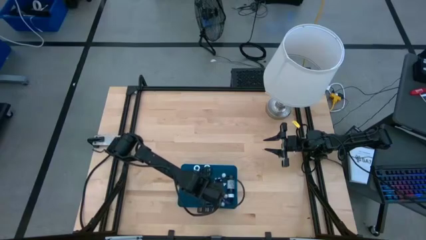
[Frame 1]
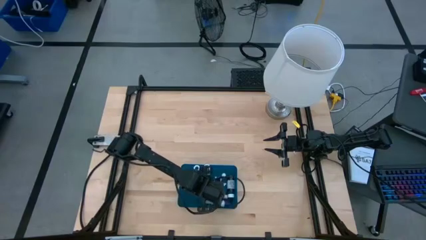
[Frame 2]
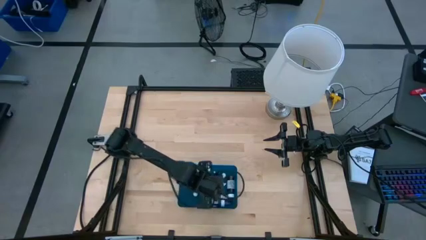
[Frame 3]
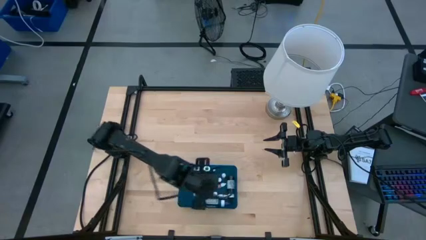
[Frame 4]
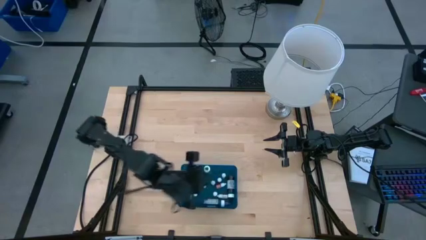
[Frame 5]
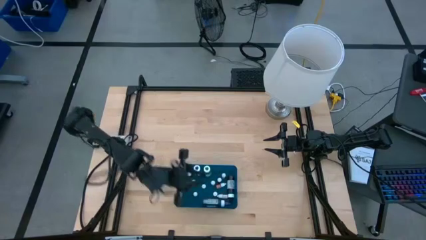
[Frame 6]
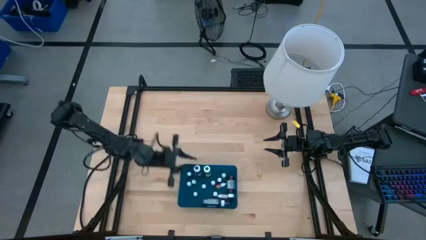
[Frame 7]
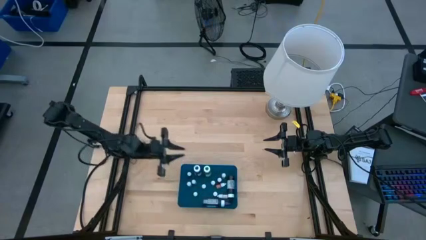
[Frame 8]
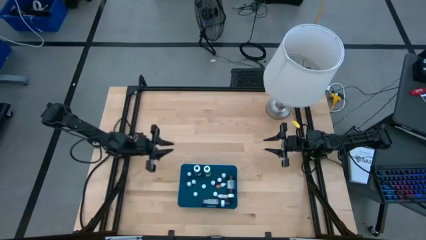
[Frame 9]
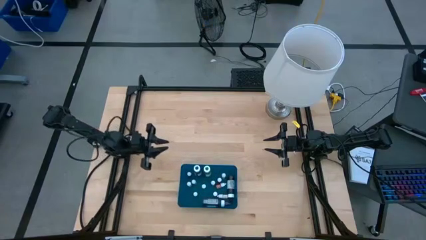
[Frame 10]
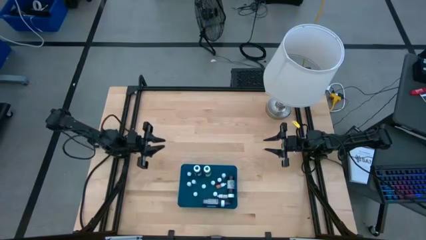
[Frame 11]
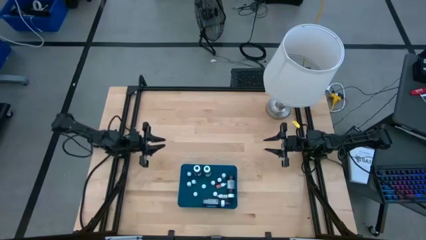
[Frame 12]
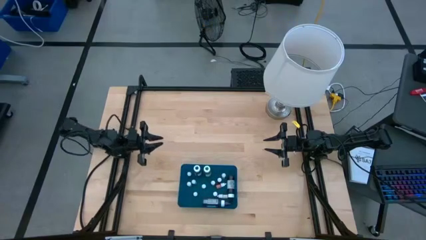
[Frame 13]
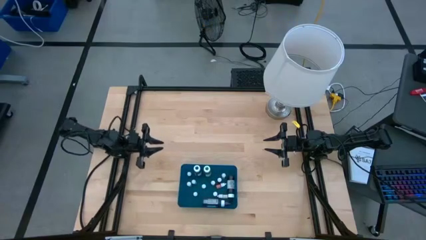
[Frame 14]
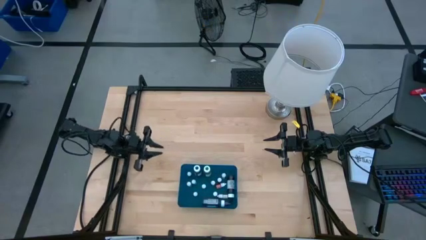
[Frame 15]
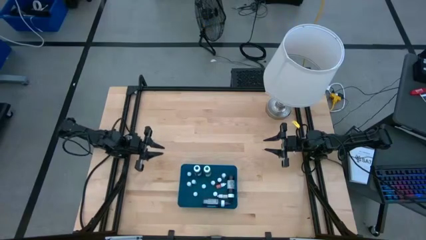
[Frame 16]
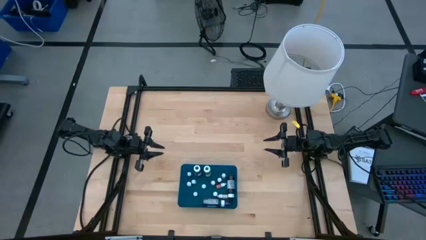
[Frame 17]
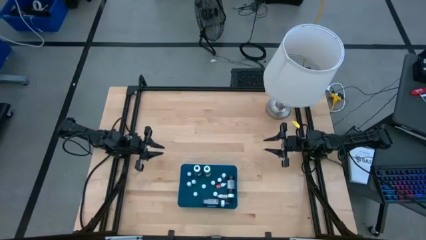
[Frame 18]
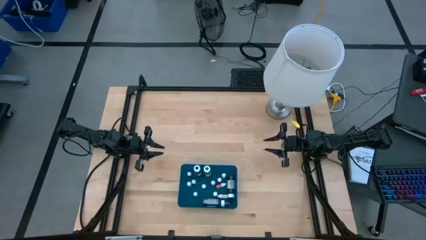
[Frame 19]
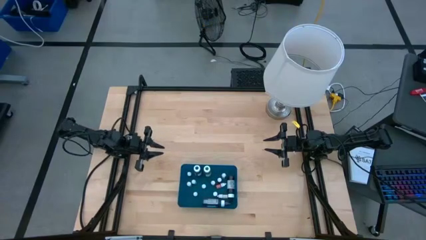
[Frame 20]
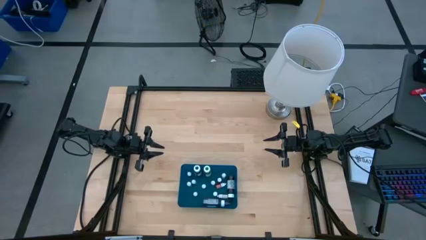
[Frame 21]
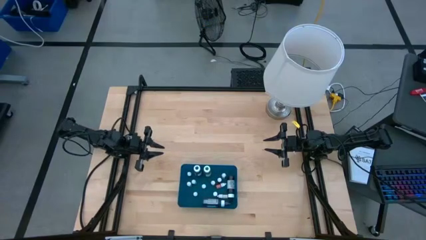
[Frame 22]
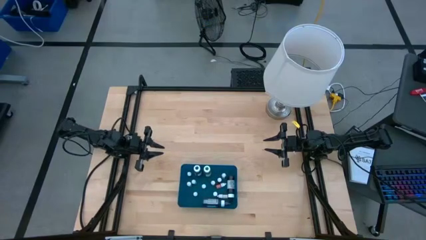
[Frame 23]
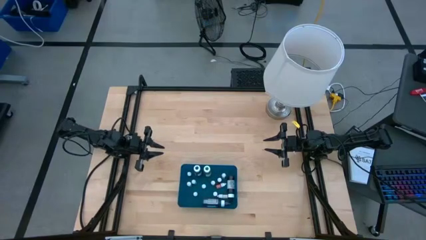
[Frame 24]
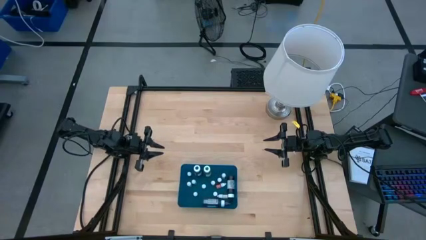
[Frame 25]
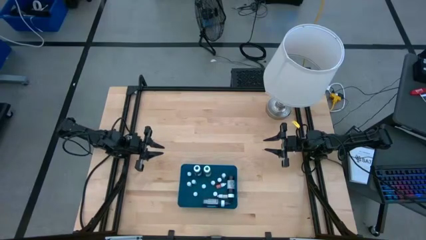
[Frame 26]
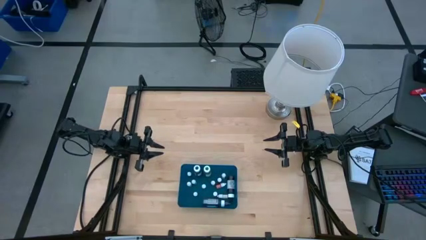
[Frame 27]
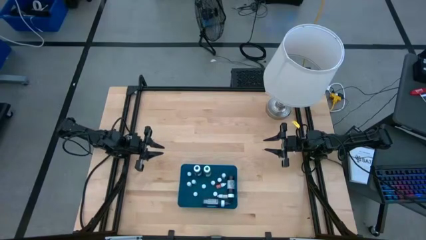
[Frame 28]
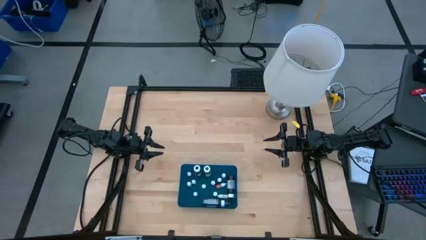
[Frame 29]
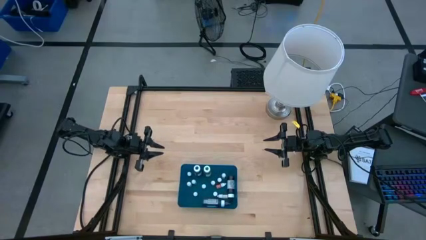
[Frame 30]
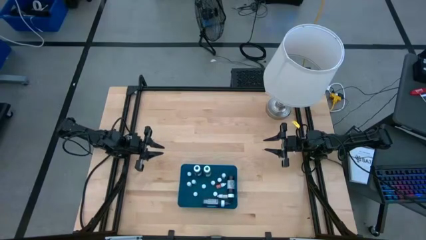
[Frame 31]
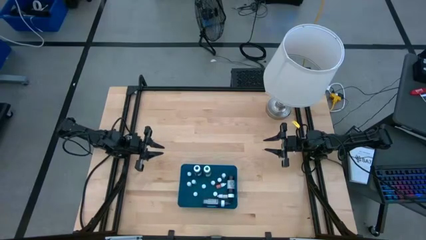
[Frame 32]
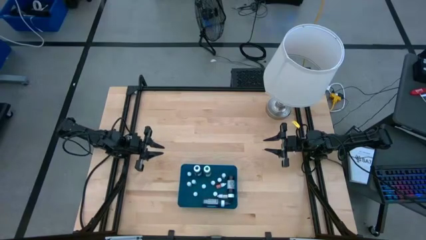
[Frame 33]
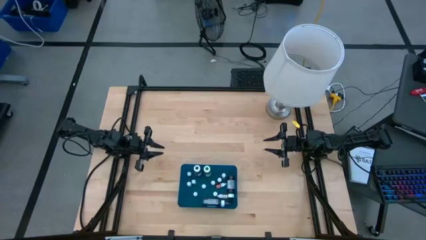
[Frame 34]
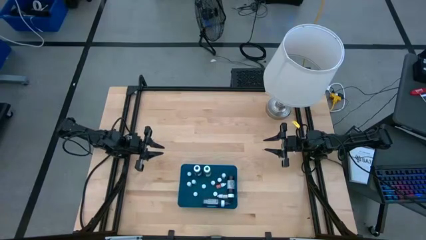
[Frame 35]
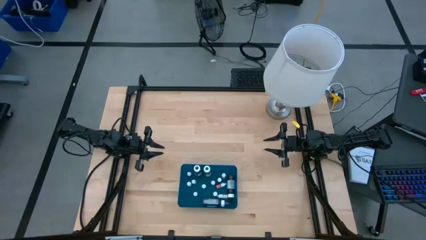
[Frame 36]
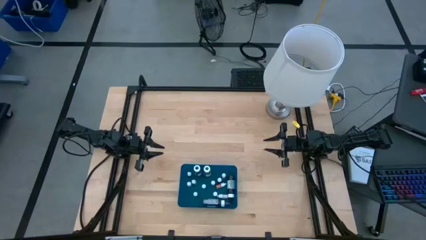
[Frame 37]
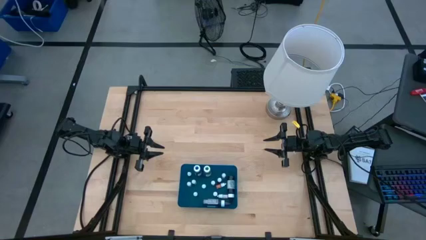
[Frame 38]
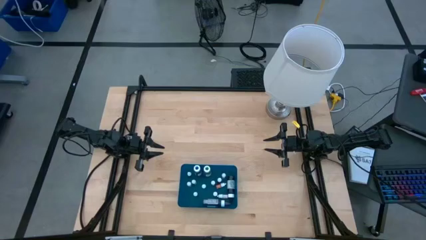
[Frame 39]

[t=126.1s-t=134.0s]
Task: Pick & Place food coloring
Return to Home Position

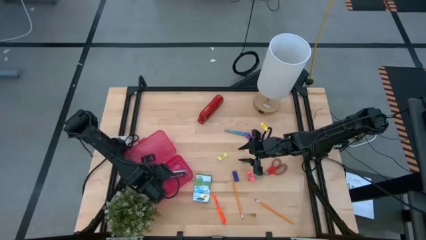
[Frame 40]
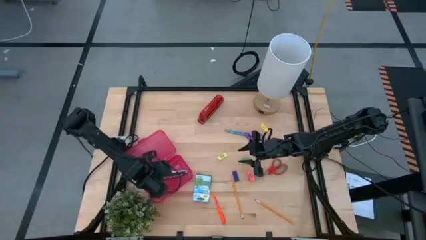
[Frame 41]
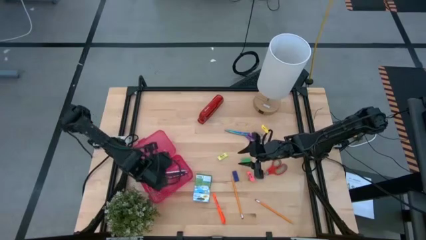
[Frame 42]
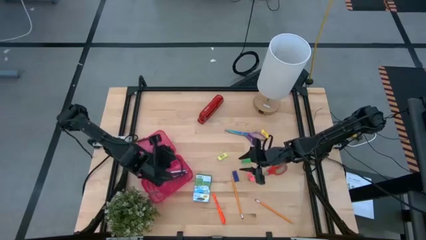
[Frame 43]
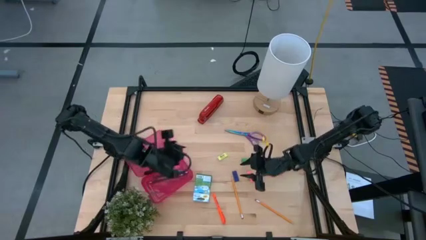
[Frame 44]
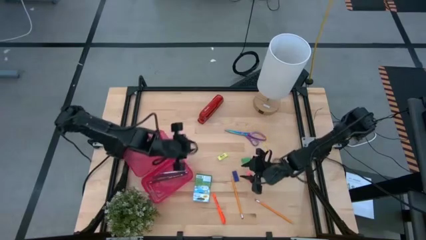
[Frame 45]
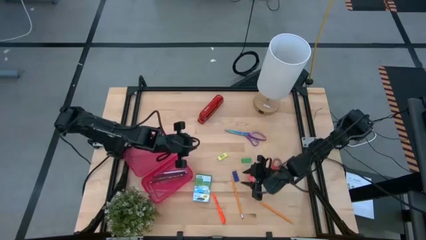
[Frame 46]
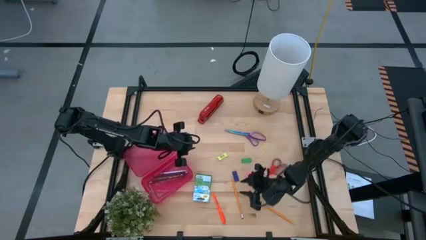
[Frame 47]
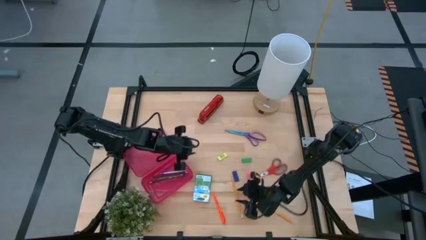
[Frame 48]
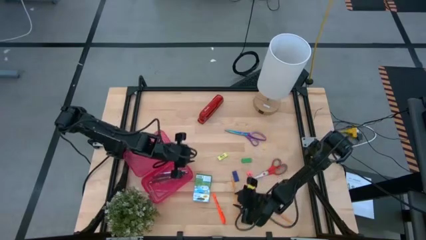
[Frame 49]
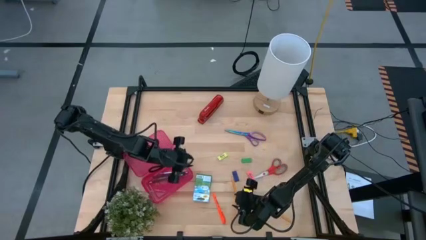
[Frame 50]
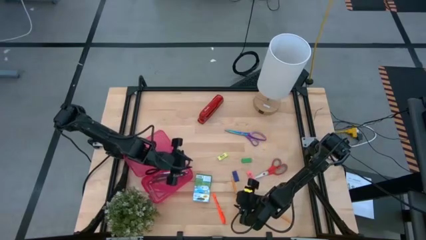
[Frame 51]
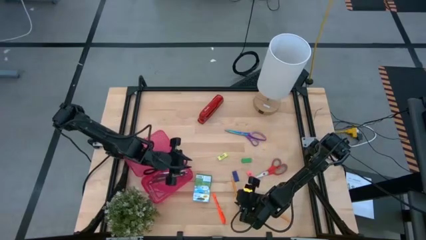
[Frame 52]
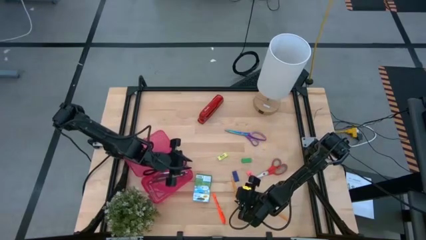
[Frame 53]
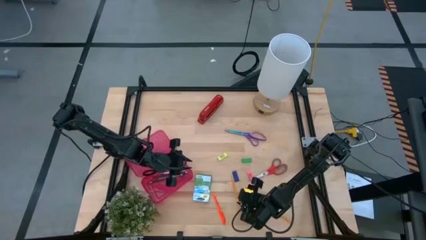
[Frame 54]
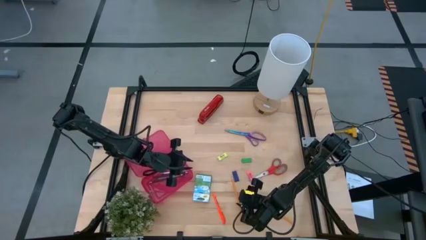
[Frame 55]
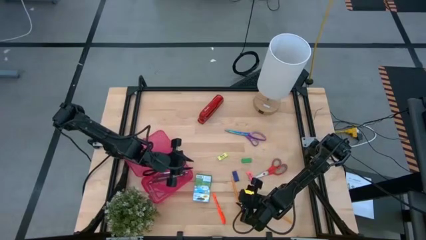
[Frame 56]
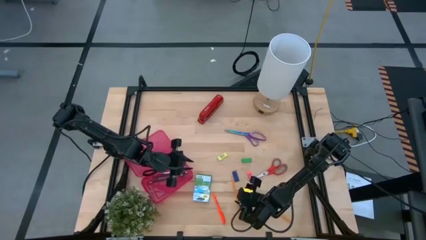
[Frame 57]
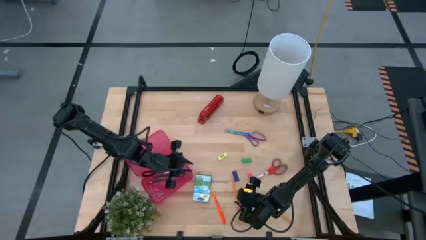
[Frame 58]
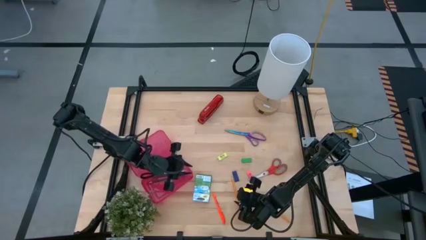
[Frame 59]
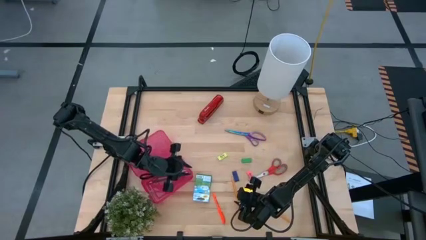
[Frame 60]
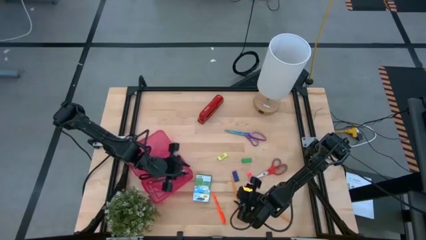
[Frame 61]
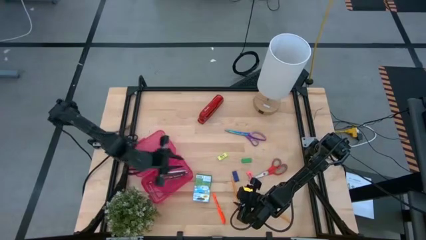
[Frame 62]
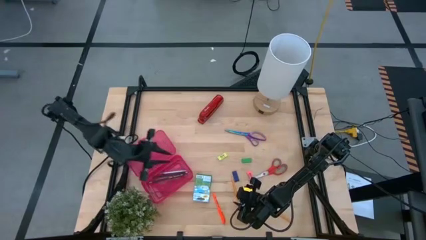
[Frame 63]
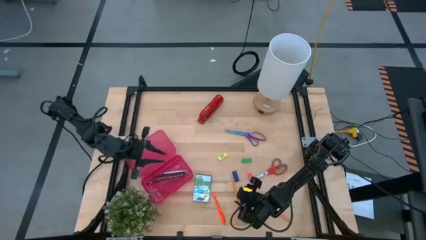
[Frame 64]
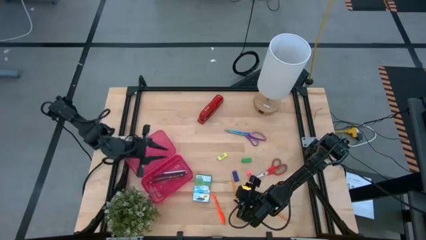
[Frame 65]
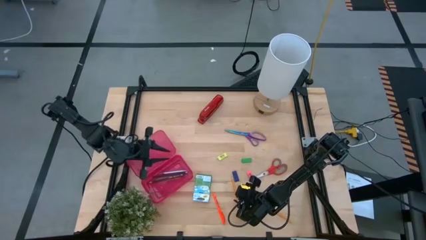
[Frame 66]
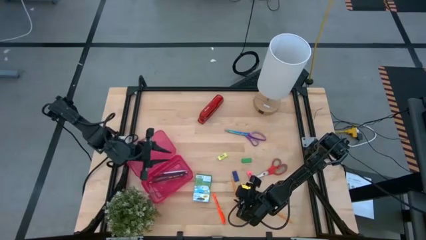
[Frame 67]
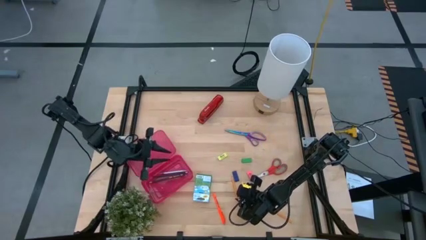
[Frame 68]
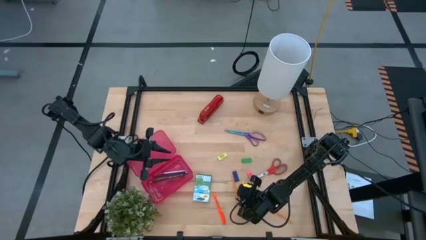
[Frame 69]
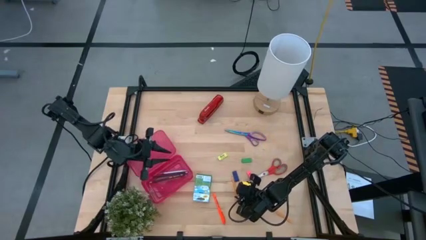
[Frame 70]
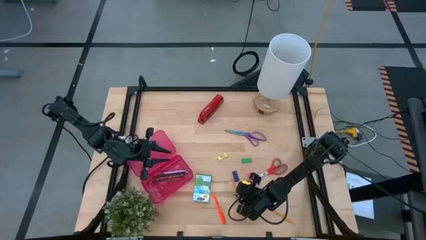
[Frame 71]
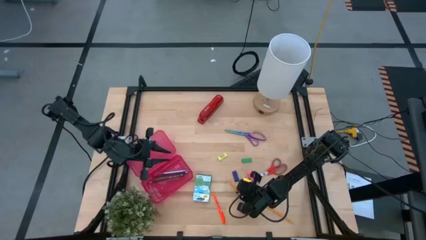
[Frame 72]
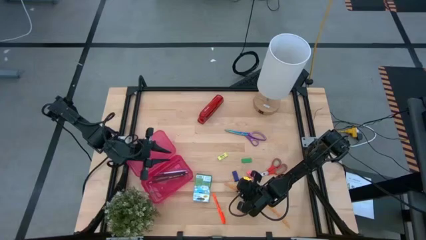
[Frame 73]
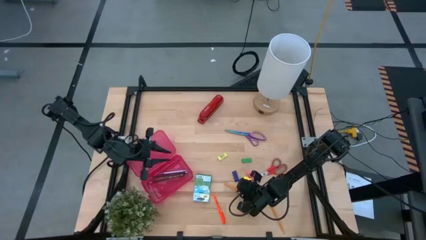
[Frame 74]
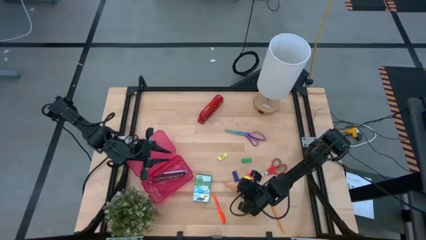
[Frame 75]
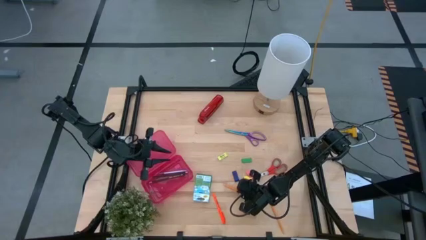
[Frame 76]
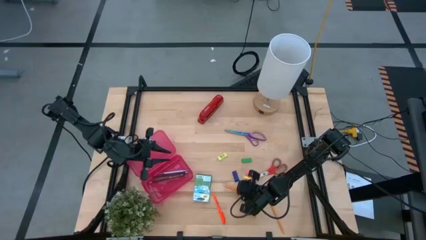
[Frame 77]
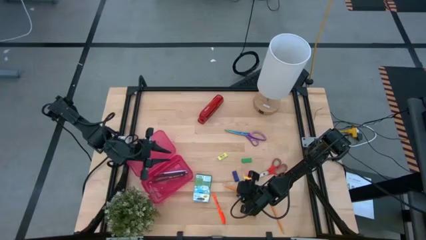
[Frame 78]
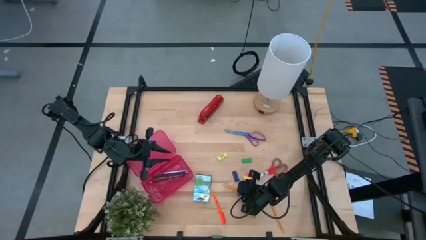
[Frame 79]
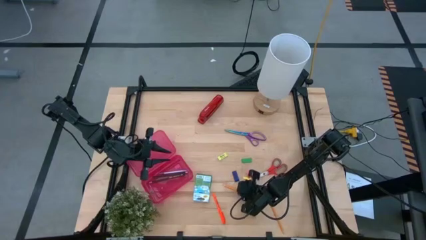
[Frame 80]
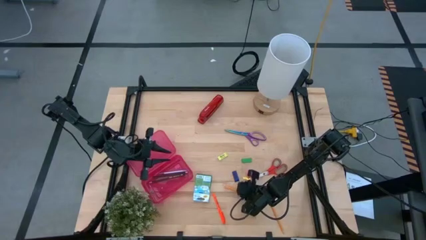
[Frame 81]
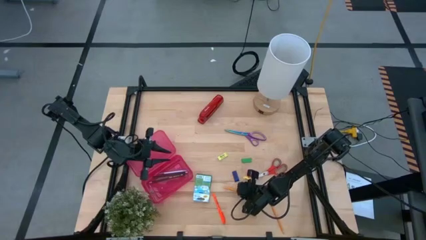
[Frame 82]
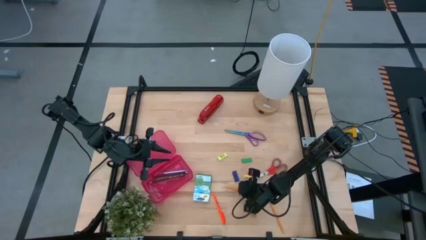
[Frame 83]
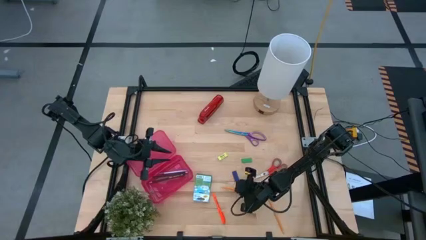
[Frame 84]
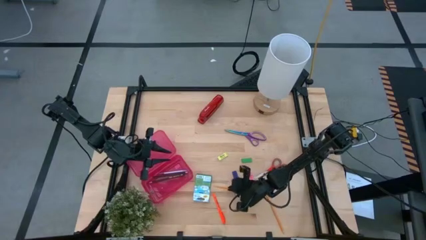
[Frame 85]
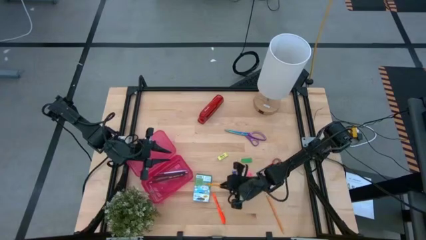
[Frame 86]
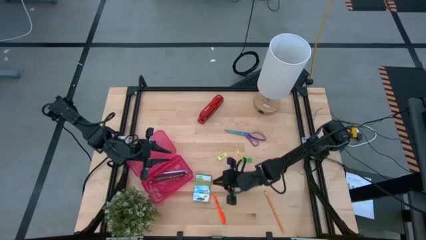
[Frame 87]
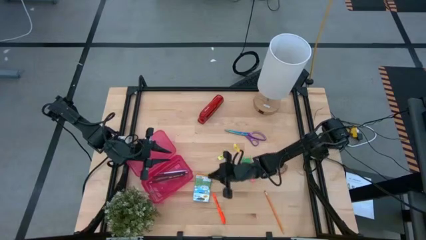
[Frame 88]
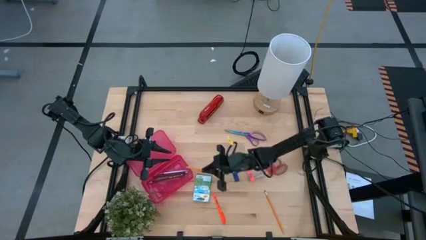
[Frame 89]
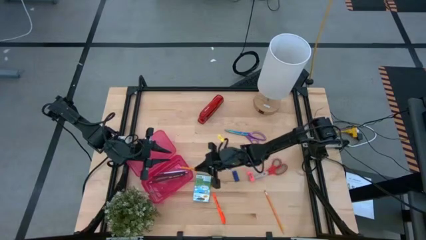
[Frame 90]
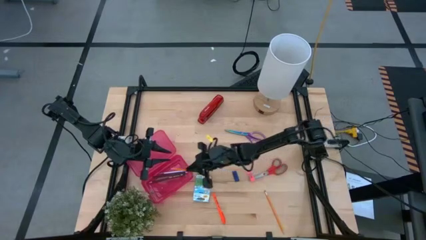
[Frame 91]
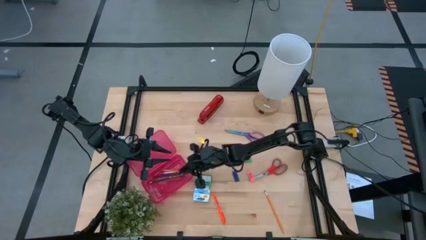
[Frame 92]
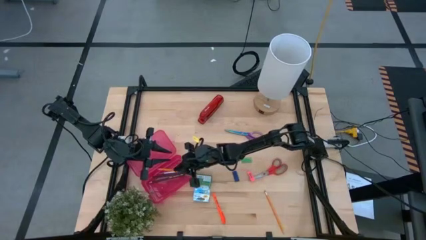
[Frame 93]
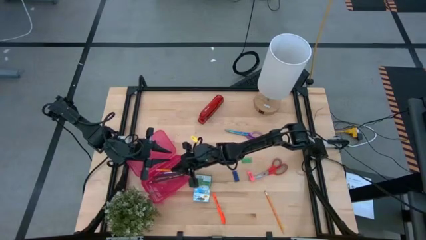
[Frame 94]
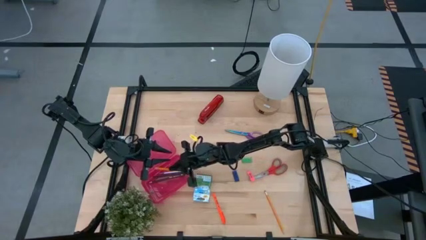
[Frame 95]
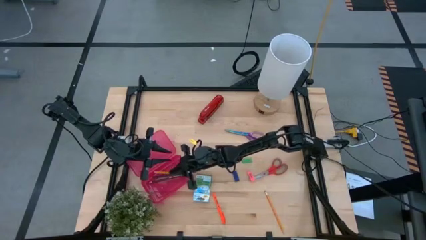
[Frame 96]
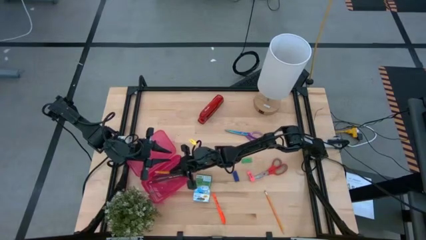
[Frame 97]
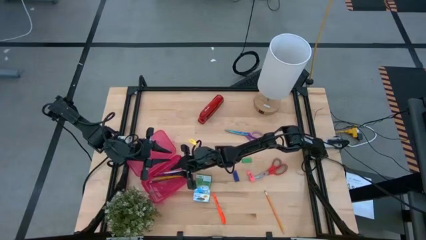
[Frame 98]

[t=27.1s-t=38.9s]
Task: Pack school essentials
Put the orange pencil into the red supply box
